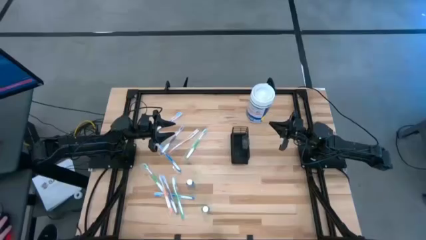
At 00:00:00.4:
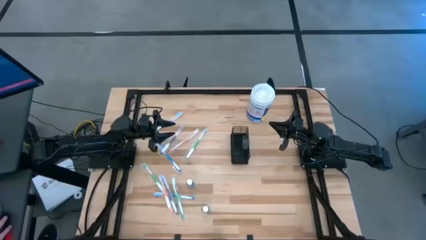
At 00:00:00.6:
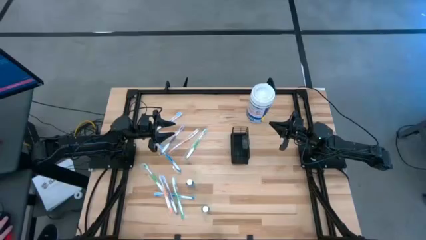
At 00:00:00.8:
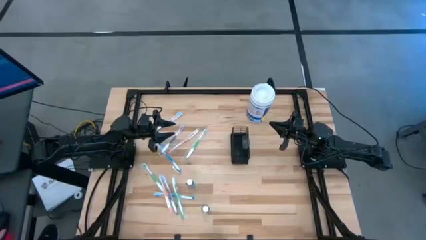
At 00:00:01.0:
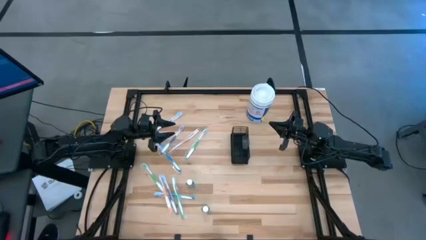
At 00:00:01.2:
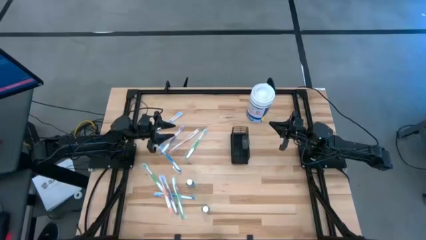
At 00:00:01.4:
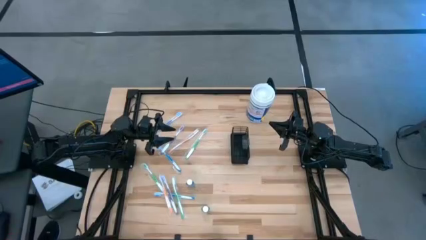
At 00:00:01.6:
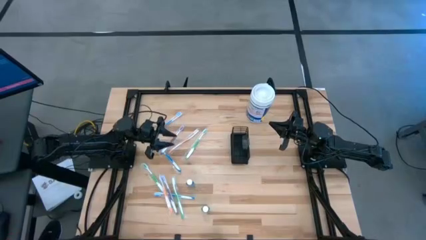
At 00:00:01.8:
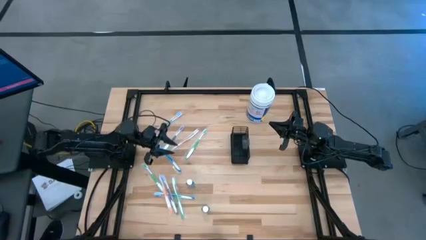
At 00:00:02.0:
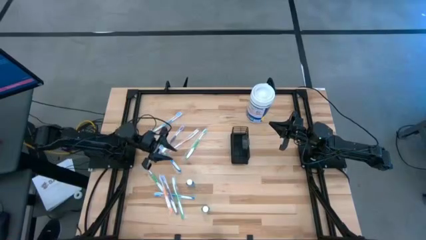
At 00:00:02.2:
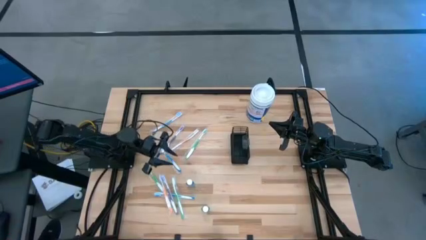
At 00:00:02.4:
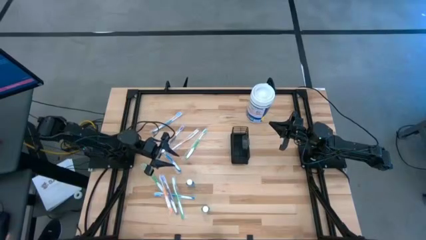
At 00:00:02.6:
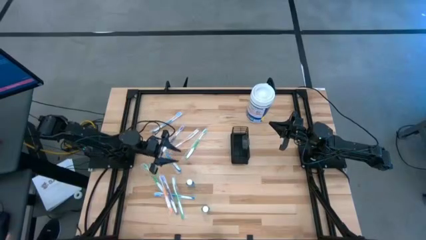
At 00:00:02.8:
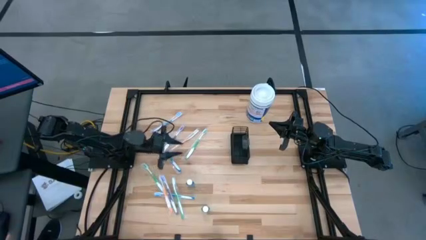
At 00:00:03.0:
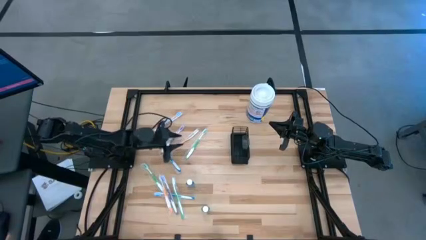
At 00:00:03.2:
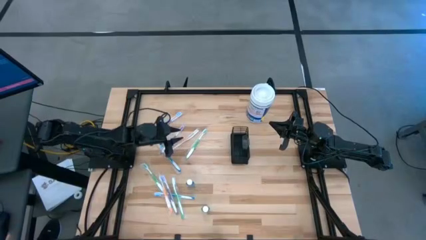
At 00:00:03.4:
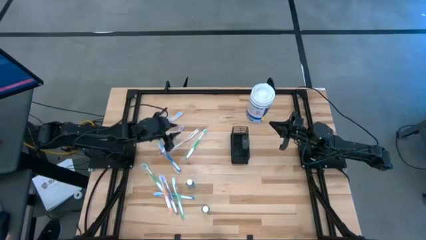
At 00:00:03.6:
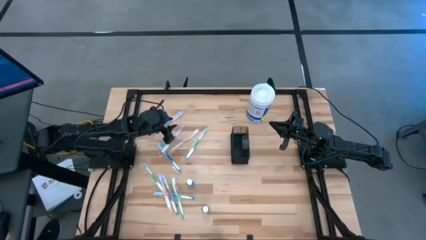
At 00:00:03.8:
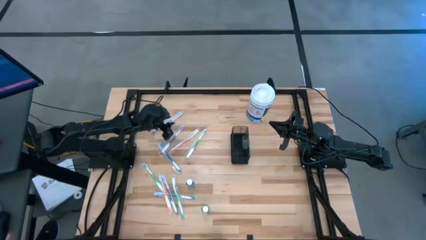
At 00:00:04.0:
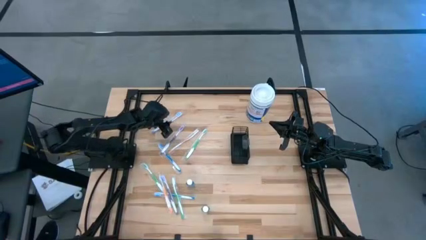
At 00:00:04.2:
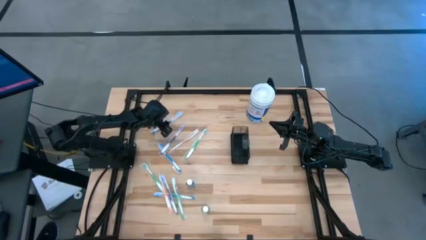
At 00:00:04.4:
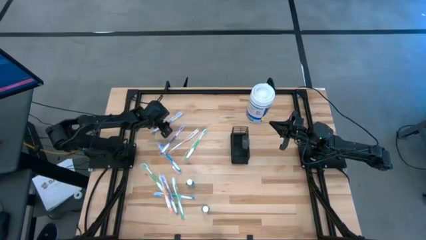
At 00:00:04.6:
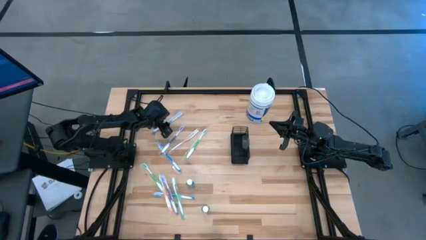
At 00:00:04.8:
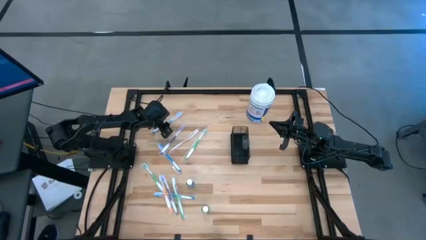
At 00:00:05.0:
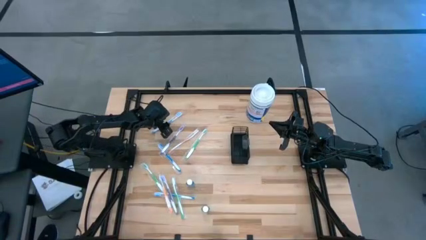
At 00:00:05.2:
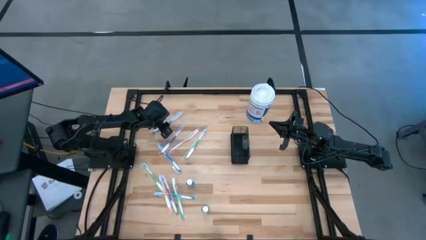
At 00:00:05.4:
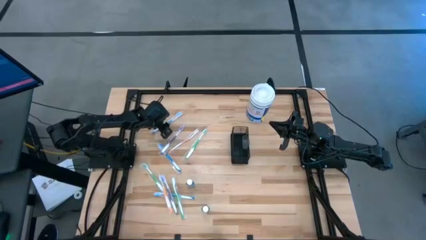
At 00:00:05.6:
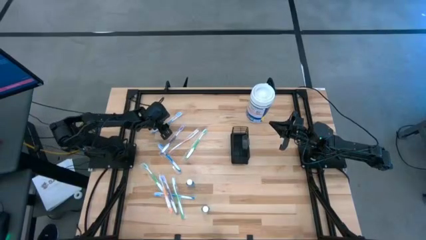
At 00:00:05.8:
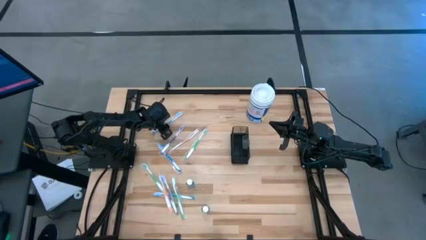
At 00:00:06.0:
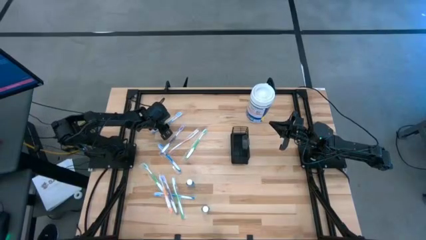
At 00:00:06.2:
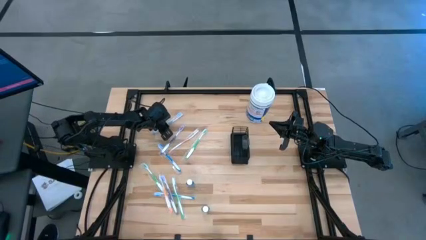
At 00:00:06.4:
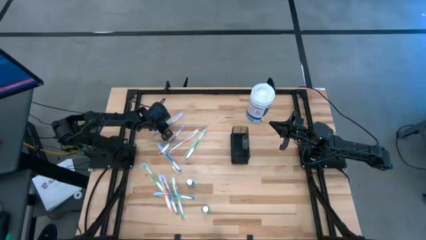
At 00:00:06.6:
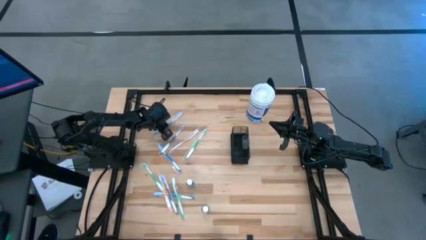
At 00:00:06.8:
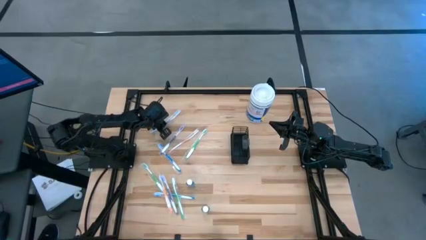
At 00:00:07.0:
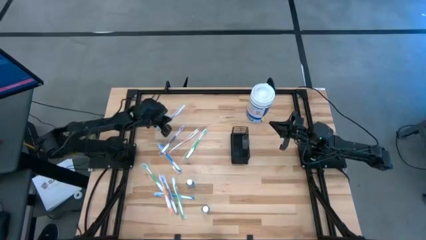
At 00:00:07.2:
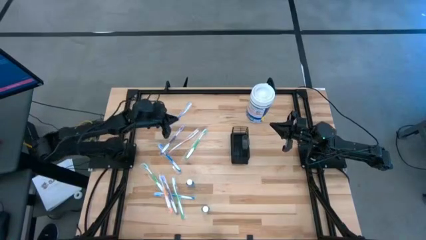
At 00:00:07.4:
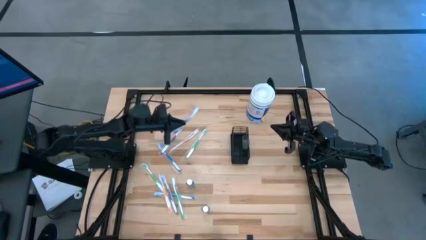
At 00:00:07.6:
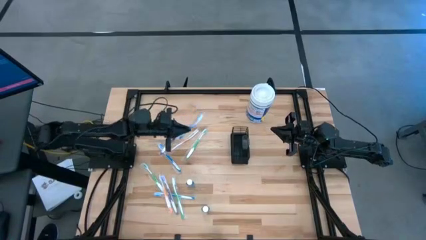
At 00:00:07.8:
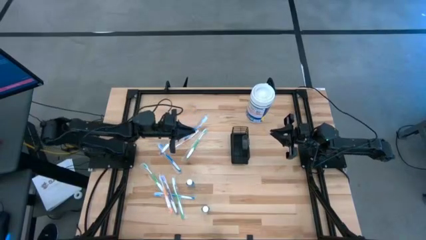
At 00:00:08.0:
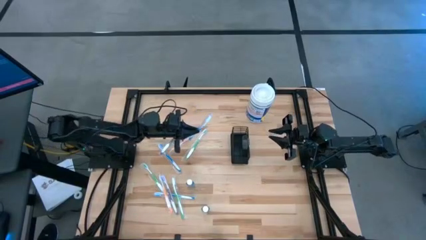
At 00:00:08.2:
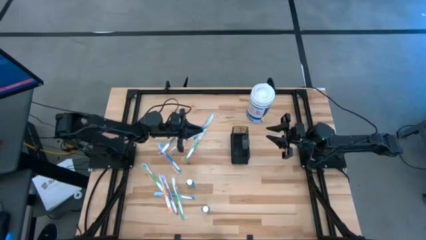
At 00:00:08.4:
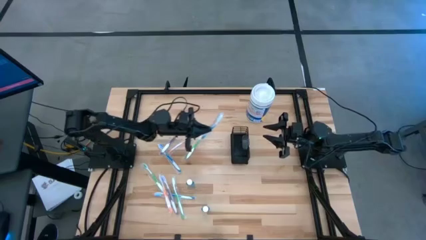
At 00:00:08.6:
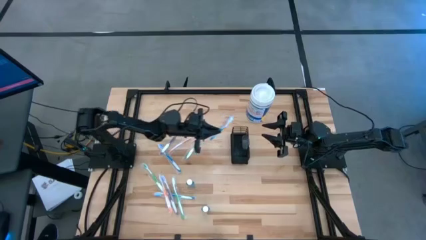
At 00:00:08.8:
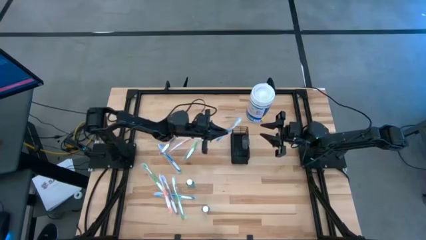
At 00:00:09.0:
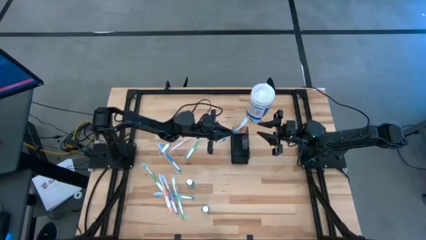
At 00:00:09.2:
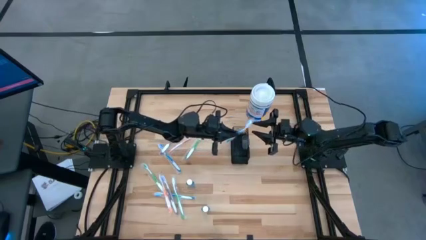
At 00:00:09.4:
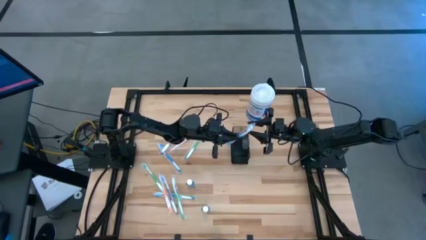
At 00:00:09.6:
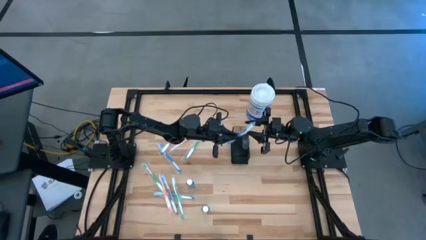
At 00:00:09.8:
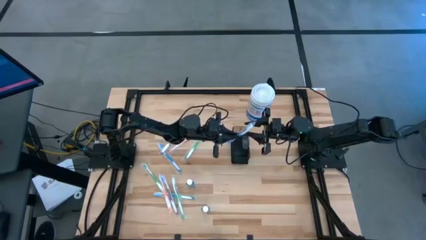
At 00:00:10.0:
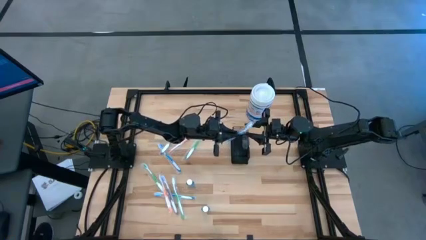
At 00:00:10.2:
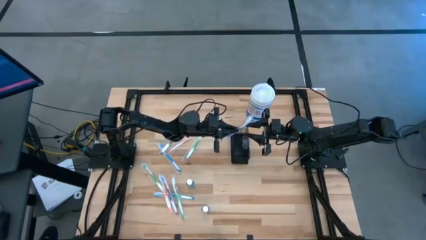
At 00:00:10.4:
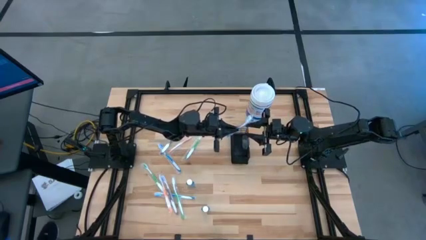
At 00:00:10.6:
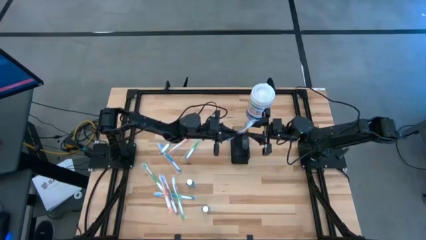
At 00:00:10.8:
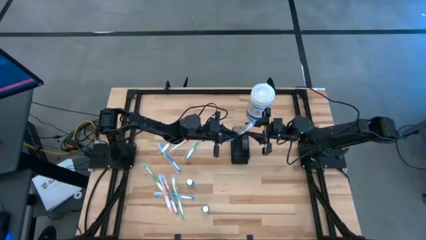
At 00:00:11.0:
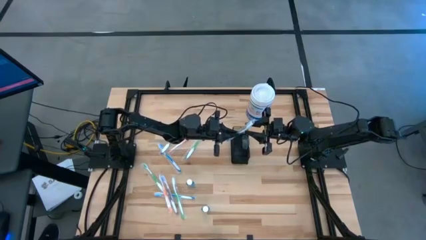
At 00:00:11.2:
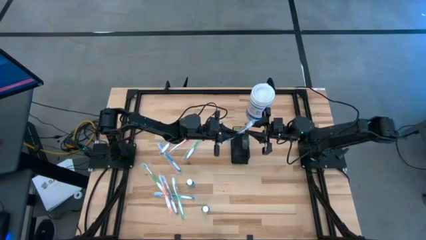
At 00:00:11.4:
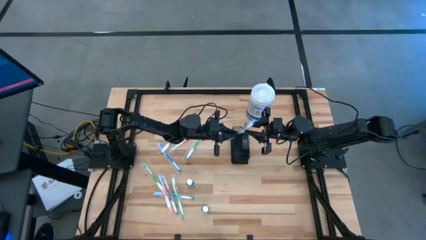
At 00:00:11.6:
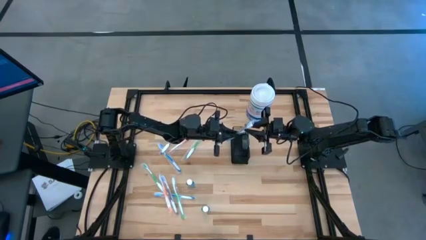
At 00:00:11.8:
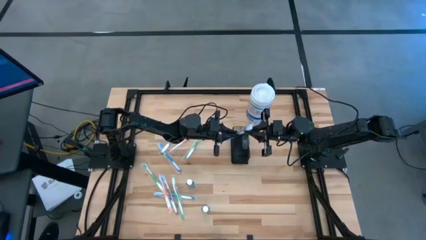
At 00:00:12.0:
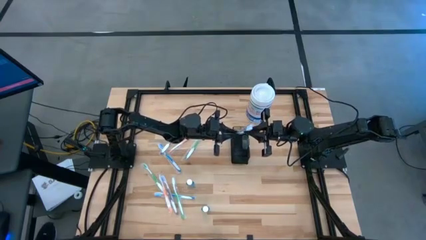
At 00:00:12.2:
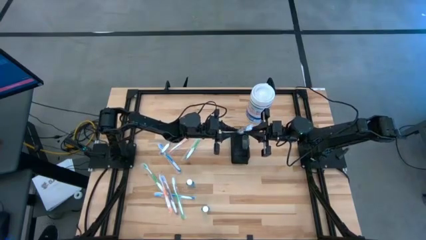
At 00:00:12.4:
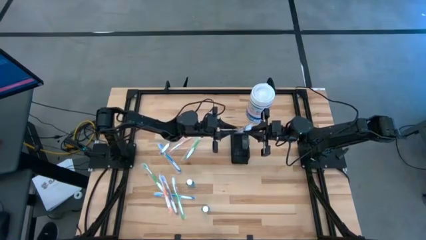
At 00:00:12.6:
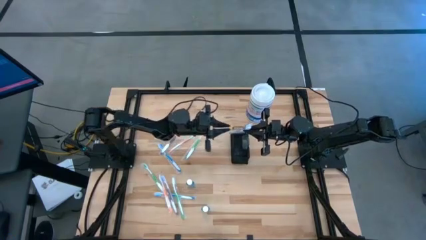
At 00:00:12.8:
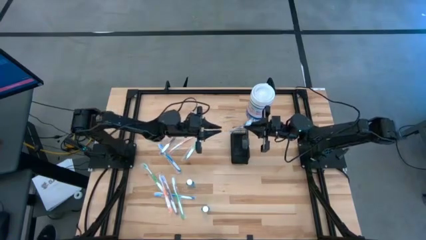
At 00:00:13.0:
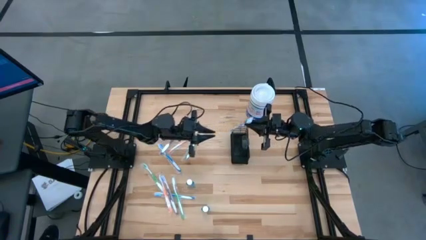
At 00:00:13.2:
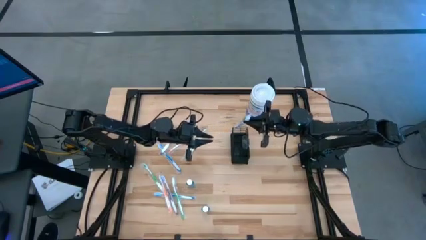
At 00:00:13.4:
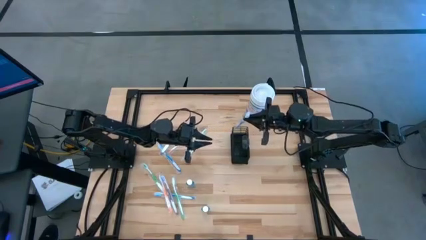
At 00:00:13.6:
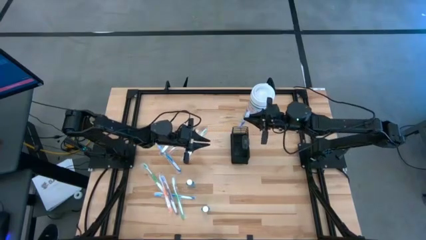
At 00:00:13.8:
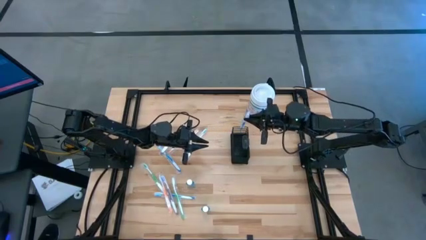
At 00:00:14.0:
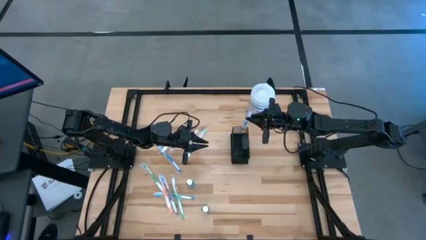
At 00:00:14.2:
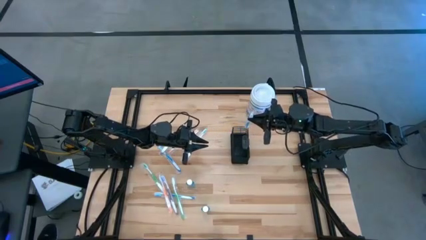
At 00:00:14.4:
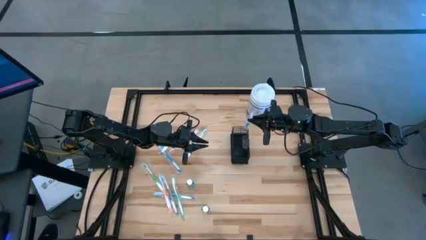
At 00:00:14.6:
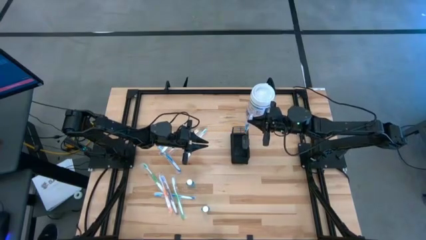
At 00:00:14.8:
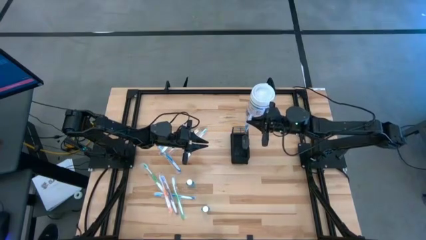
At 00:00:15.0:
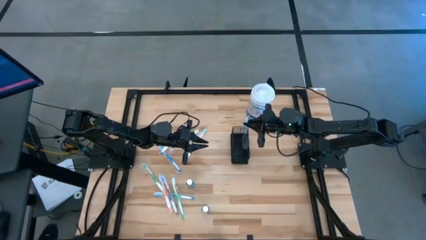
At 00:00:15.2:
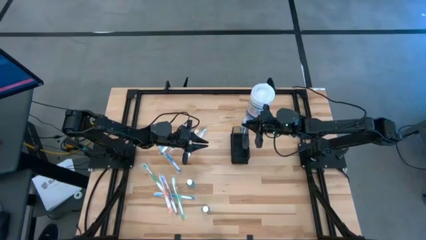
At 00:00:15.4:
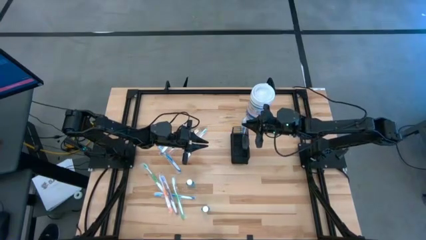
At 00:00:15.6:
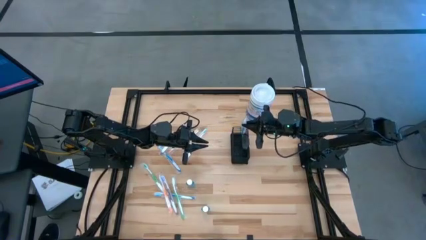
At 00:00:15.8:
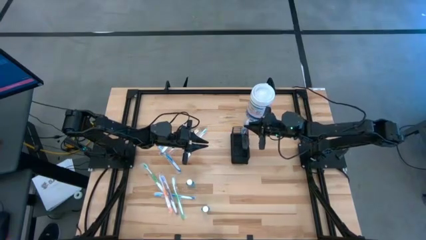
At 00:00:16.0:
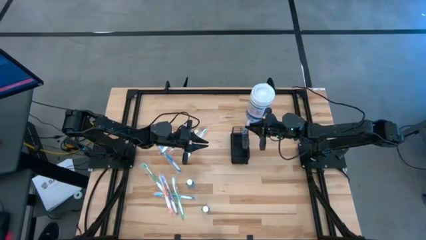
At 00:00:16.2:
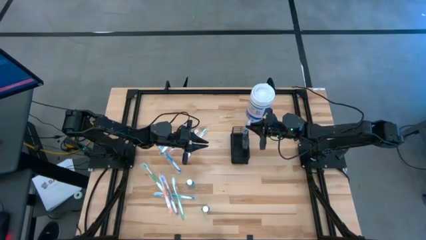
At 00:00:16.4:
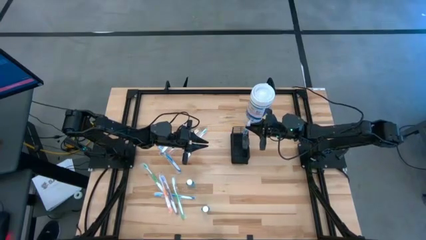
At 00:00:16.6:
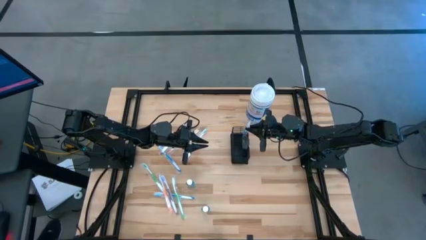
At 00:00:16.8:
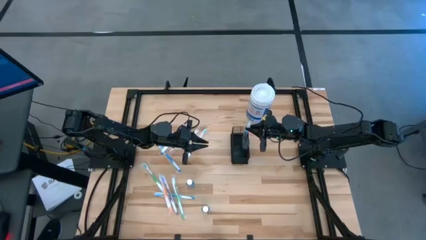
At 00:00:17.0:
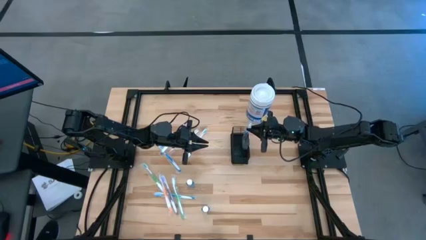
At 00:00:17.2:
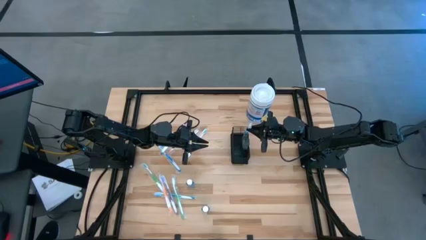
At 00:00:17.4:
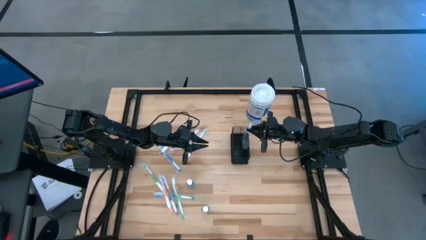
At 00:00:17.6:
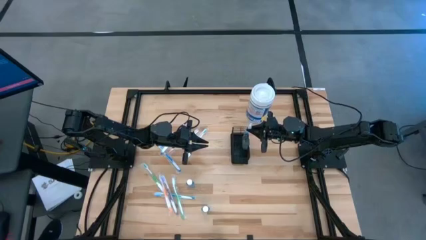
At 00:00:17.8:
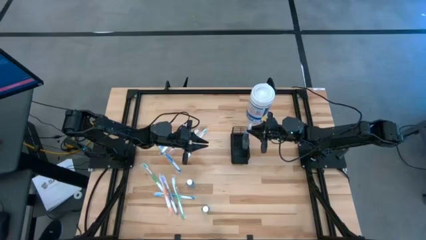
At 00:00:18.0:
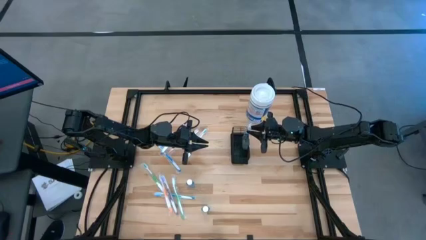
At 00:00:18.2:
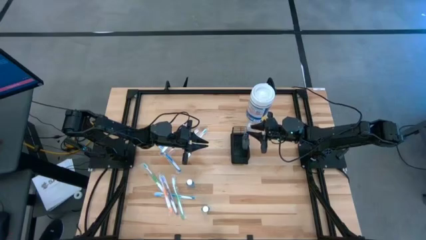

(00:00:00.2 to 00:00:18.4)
Task: Pick & Place toothbrushing station
Put the top blue toothbrush into the wire mesh organizer
